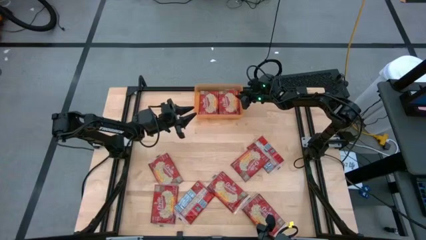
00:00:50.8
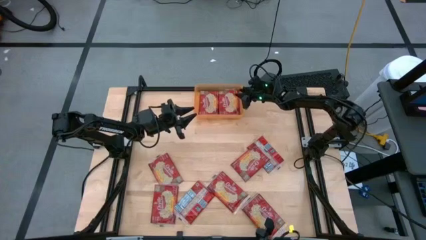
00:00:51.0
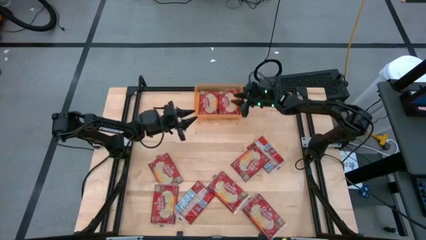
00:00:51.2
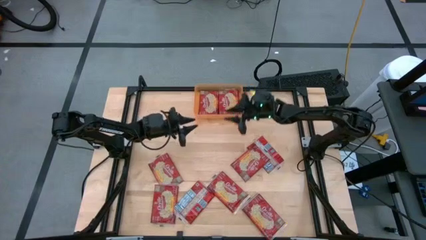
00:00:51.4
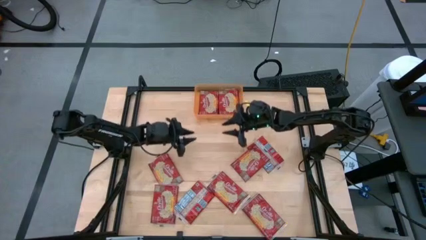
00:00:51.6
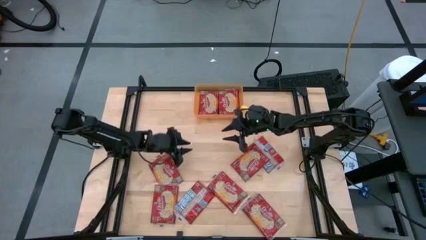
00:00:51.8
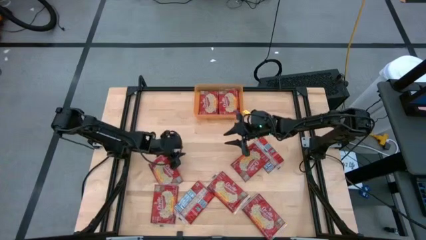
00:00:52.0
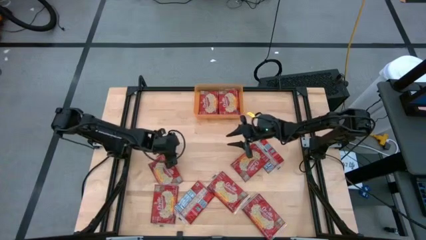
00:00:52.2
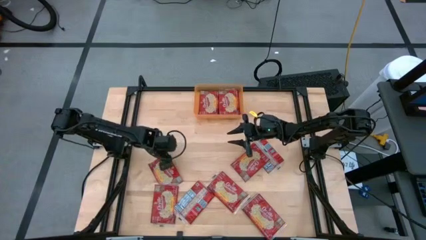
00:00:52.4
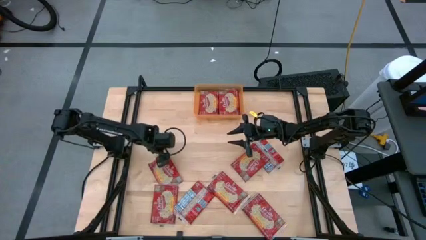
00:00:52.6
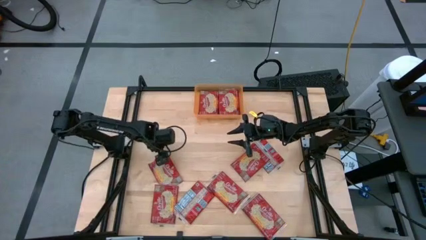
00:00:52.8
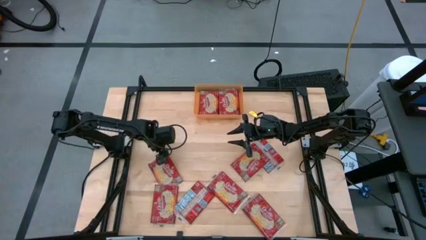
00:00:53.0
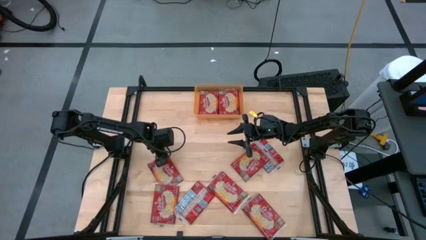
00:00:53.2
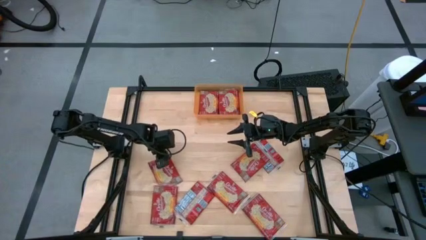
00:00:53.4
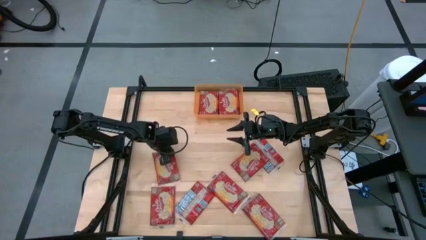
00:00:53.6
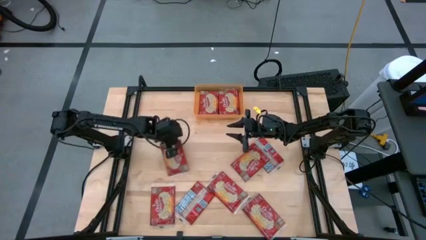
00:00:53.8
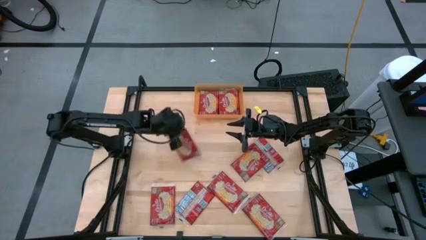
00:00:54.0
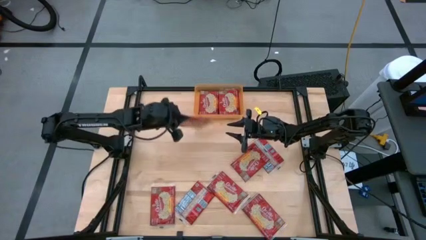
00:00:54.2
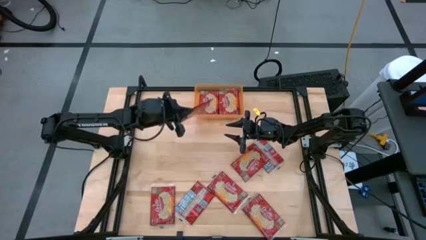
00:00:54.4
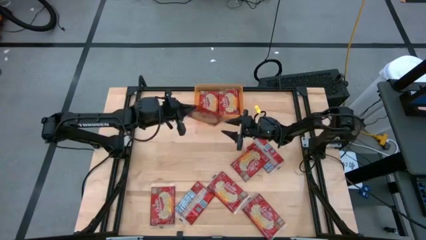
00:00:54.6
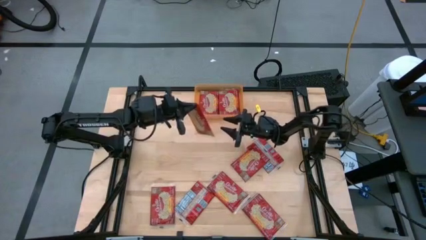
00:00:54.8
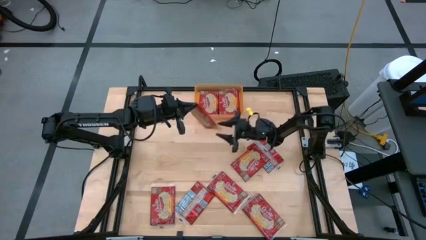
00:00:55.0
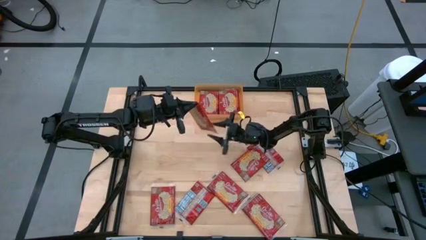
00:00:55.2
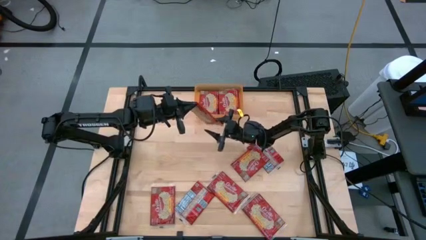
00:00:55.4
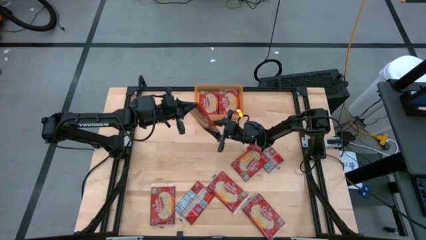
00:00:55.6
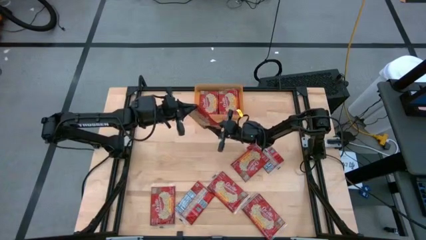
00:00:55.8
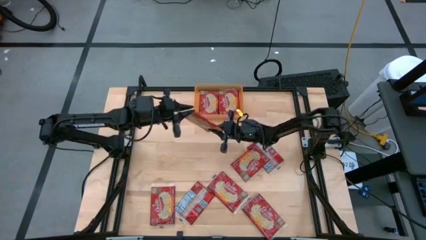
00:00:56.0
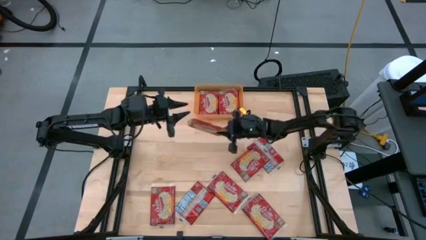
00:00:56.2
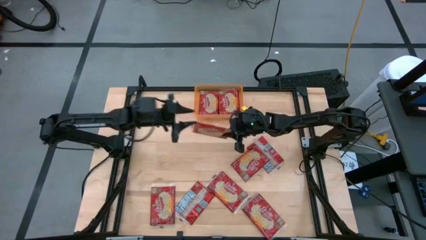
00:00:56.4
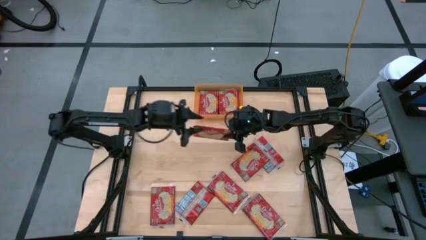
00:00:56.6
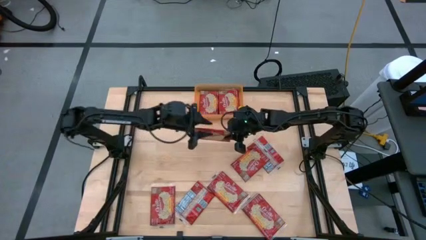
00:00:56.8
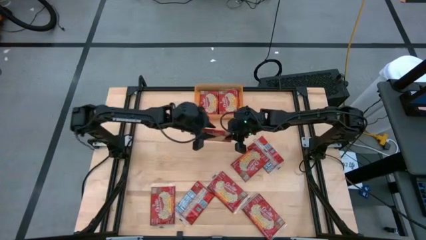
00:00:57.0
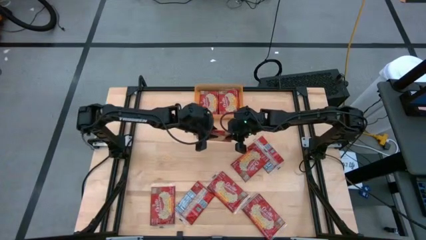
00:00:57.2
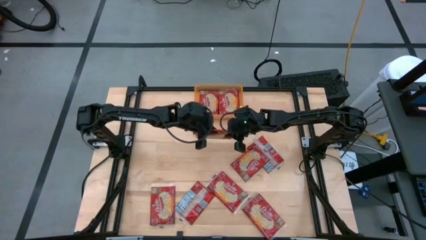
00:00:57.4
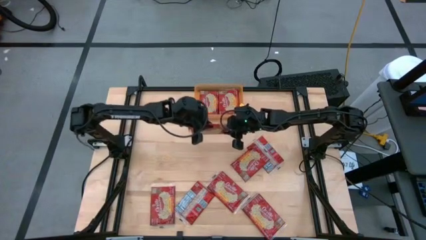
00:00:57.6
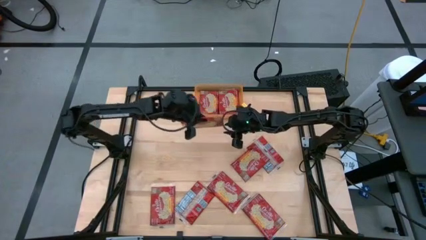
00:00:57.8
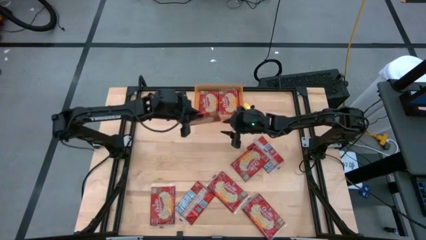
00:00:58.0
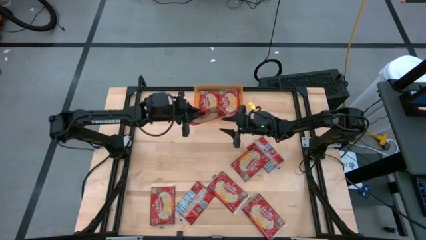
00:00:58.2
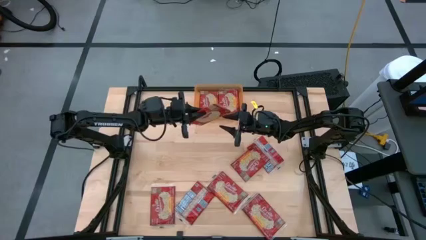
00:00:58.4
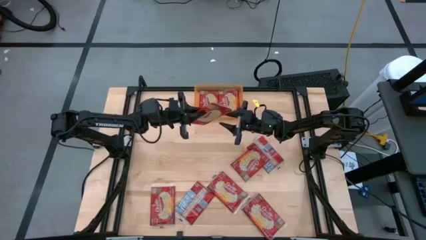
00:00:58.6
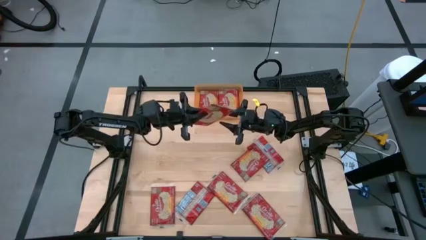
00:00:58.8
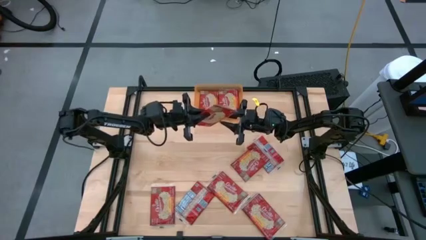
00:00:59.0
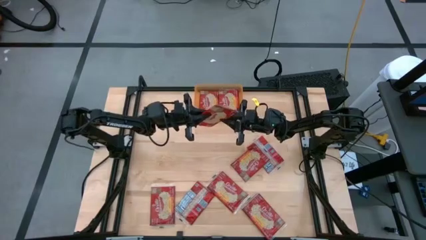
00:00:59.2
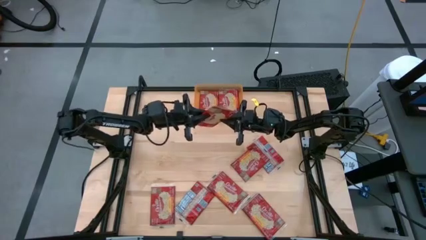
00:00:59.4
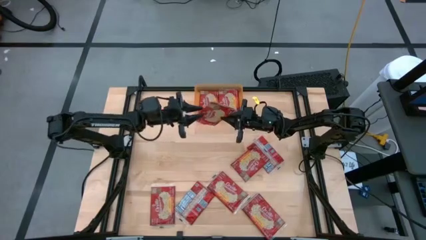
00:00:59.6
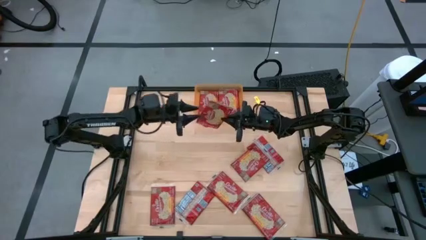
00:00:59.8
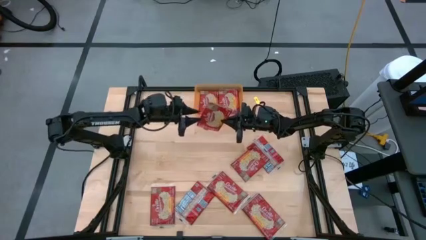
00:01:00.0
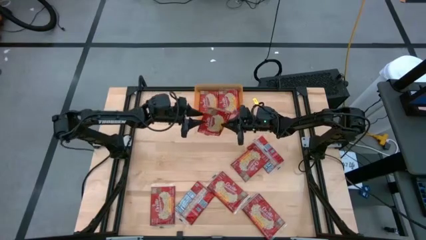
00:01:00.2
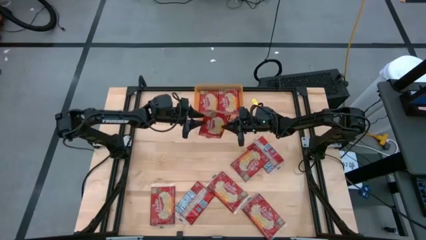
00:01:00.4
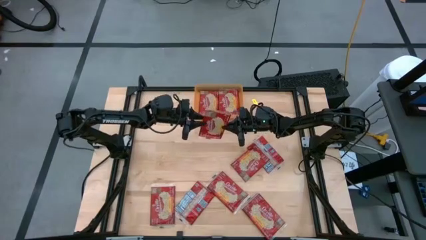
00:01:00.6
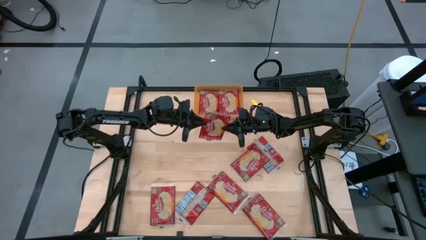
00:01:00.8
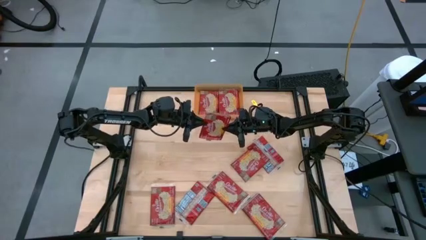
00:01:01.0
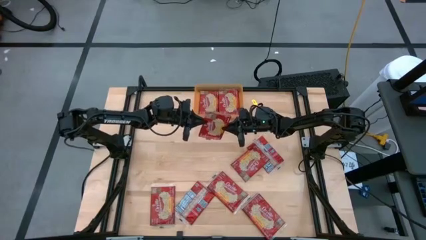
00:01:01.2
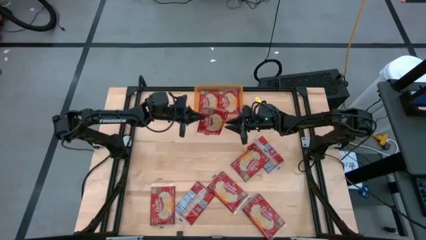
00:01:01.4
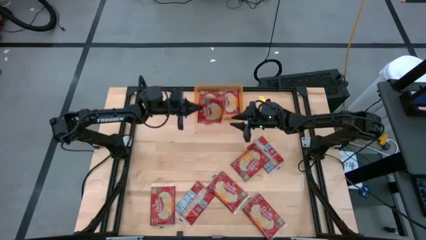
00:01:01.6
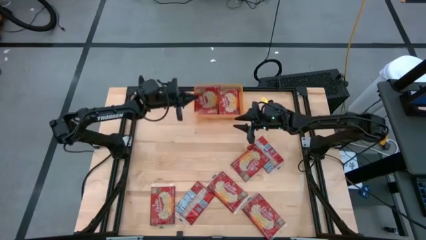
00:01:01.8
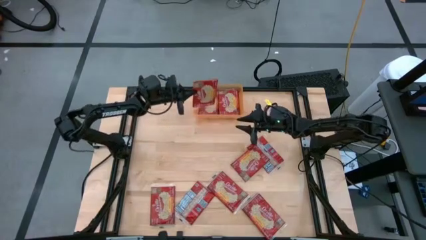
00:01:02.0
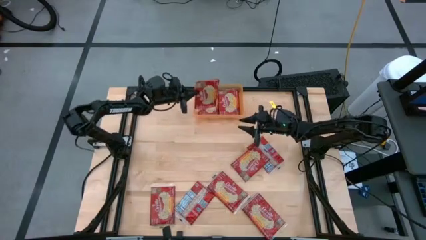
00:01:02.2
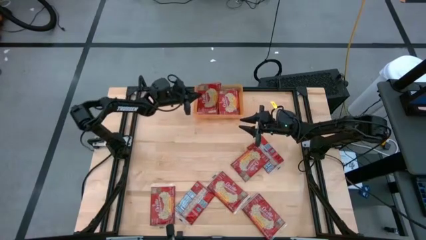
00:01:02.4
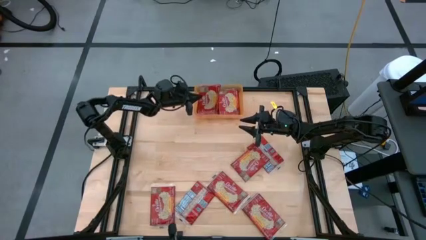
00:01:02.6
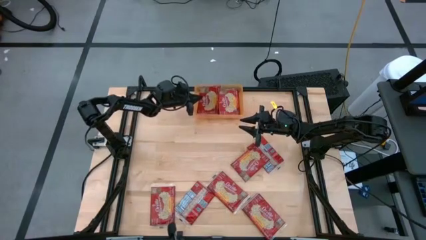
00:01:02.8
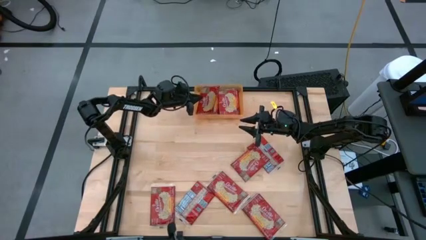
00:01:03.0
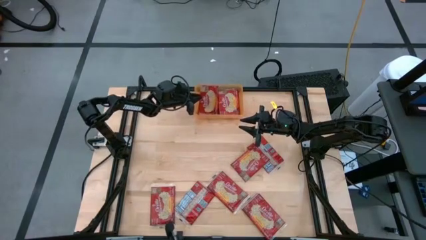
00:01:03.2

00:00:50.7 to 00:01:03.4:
Task: Sort popcorn bags into baskets
Put the popcorn pack into the orange bin

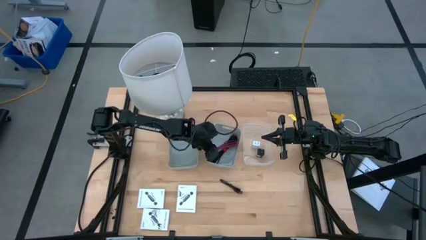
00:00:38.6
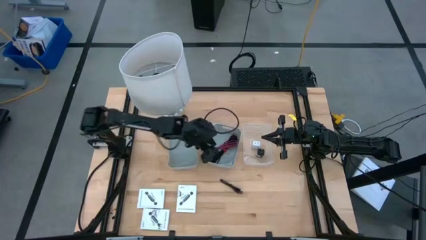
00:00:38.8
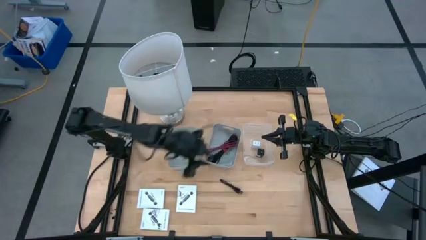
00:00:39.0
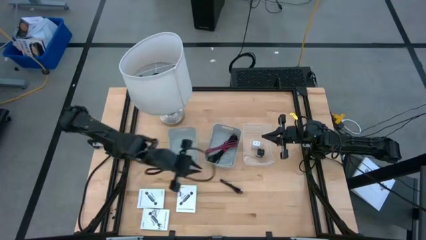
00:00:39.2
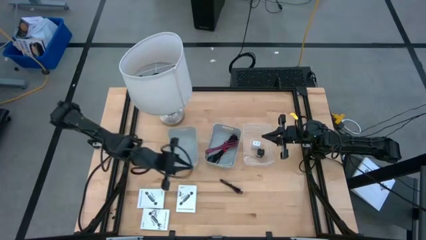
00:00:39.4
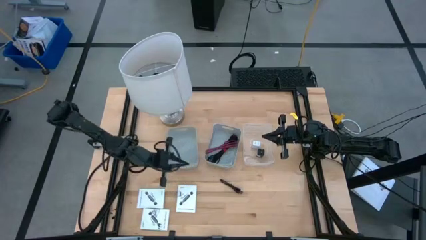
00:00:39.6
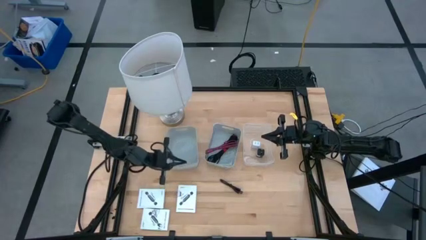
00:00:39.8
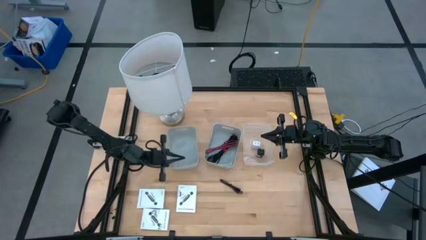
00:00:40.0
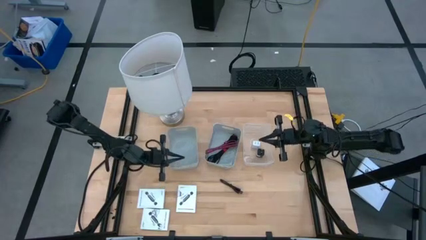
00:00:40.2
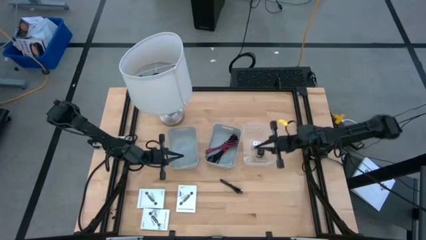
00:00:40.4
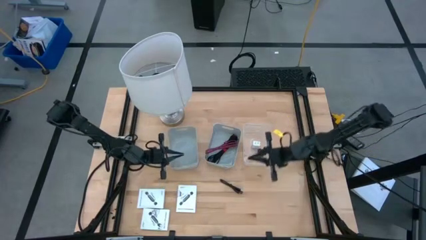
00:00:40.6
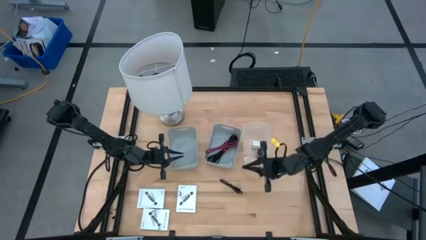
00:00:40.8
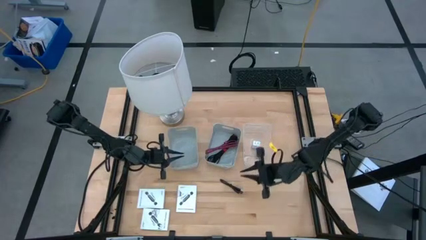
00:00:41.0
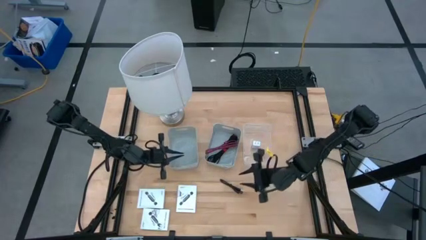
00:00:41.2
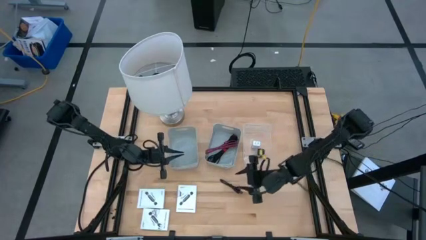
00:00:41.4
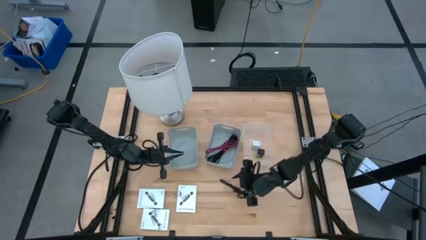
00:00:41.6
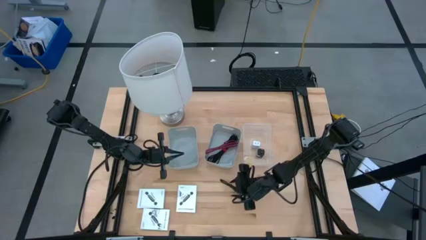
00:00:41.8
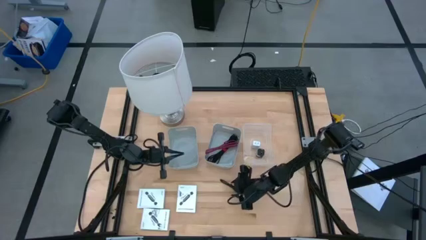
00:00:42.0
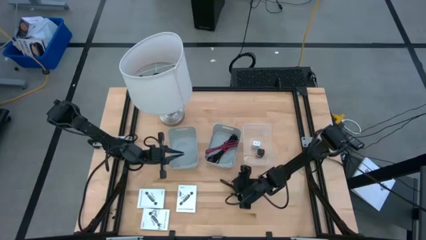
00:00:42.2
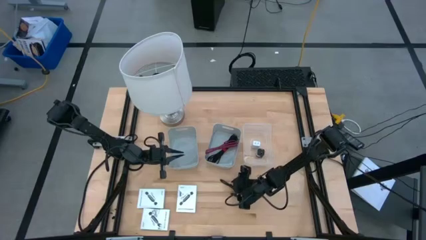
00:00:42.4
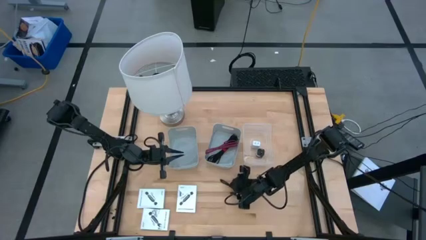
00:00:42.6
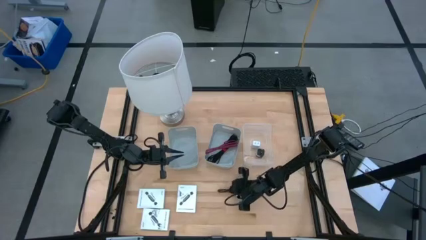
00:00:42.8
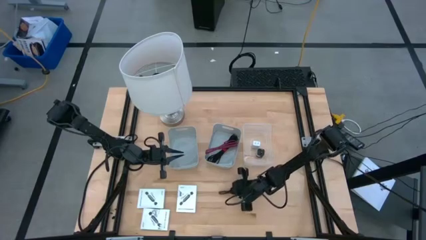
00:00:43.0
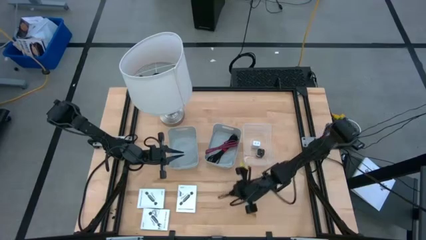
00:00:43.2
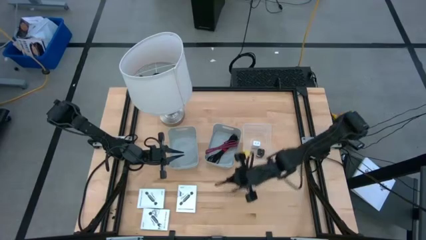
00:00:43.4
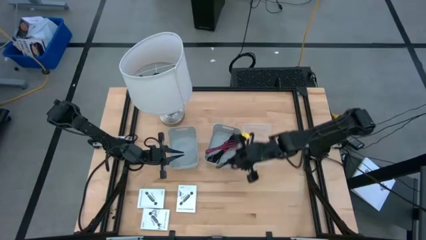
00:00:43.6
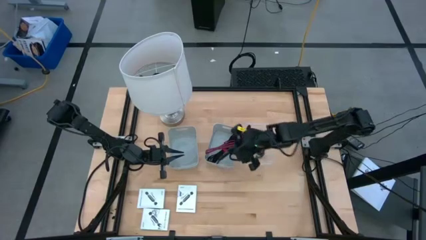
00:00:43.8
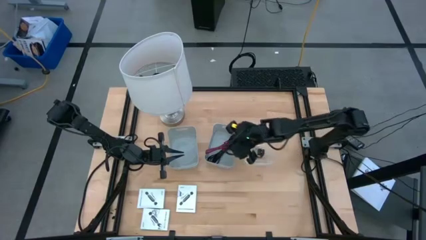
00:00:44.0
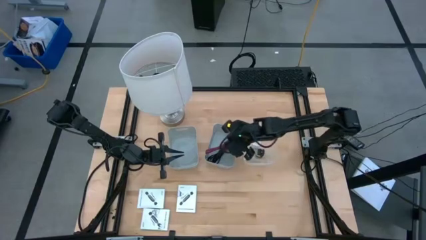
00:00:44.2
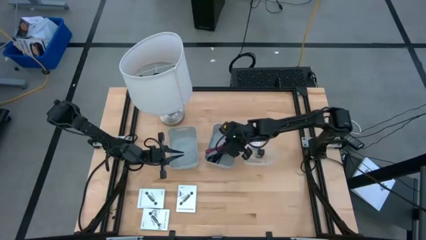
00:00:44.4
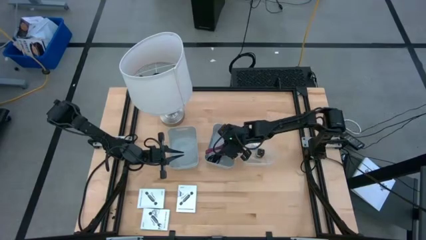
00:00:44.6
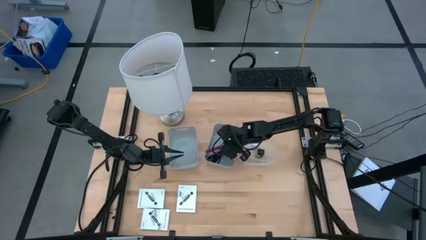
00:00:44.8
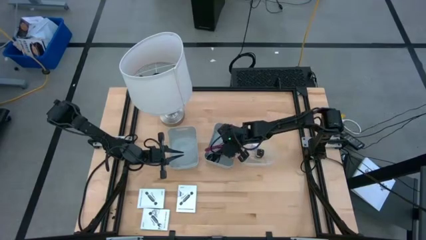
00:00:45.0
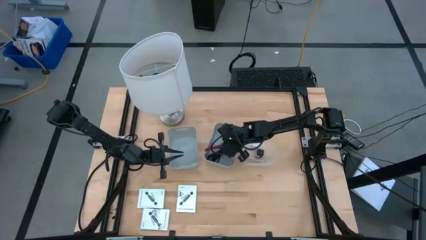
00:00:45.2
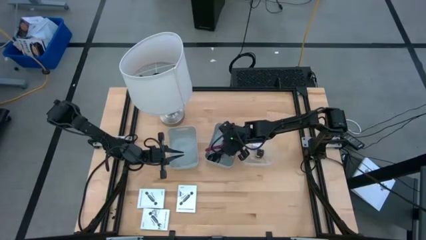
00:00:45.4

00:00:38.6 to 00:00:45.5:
Task: Pick and place items into bin
Put the black charger cable into the right gray bin
